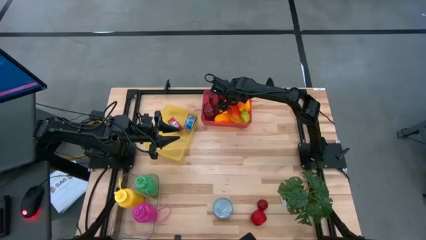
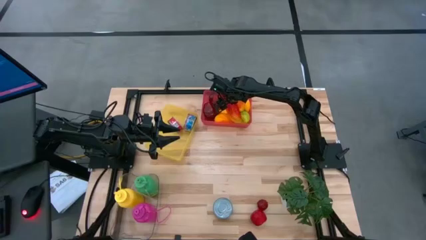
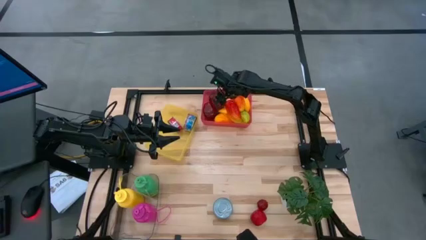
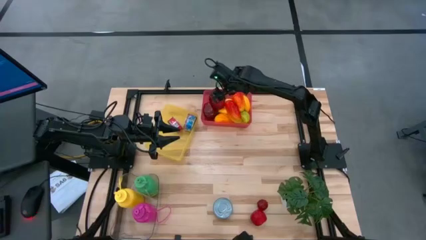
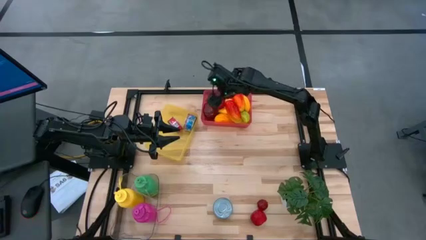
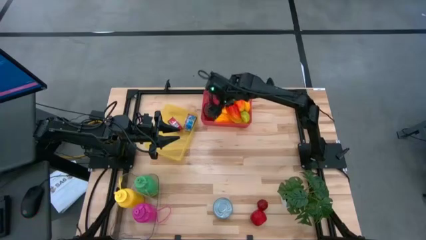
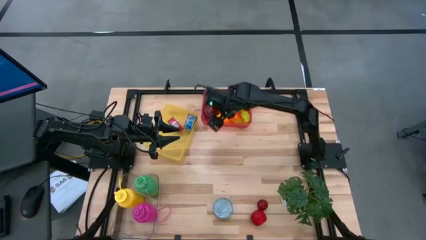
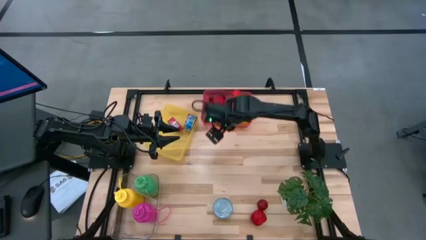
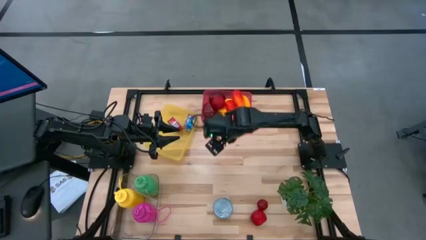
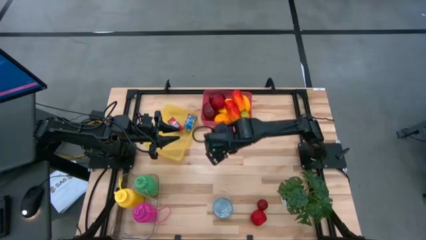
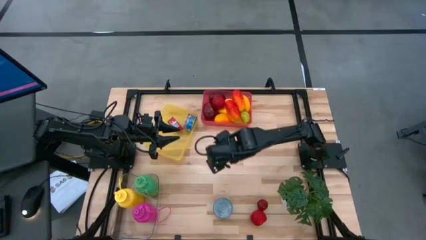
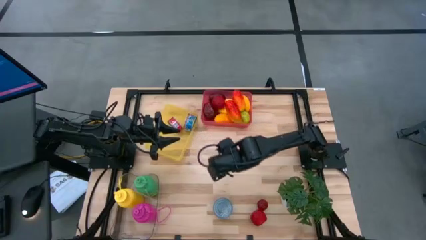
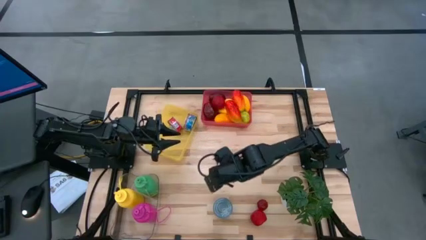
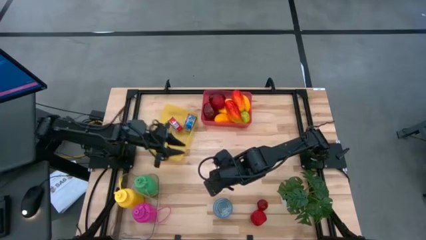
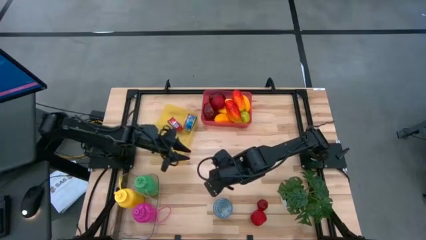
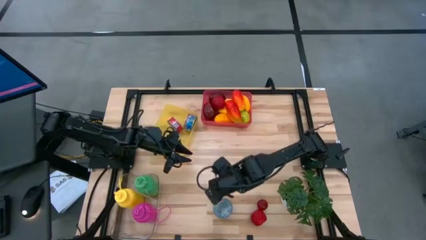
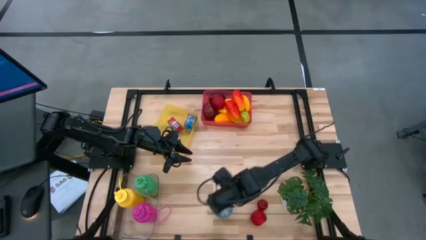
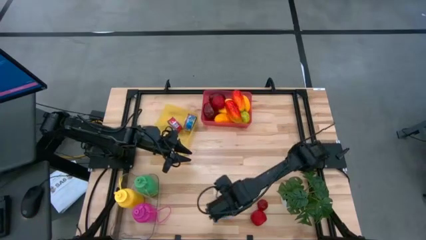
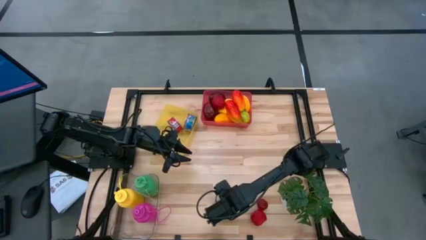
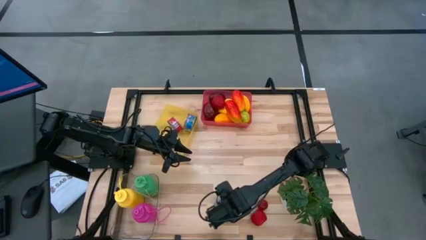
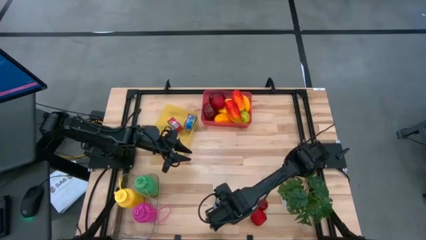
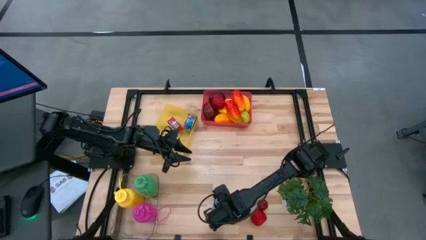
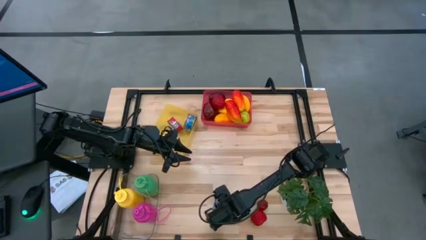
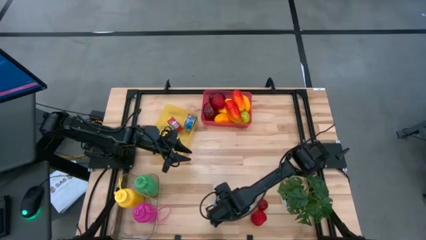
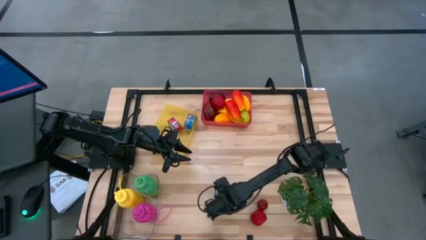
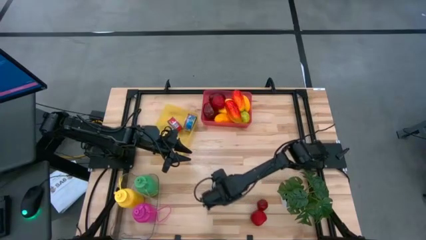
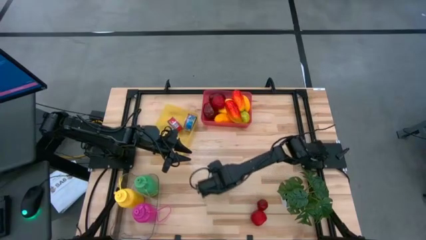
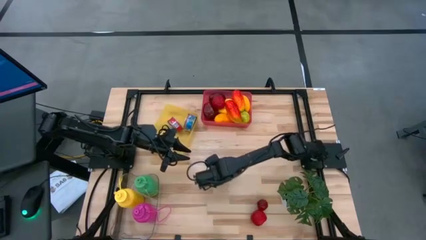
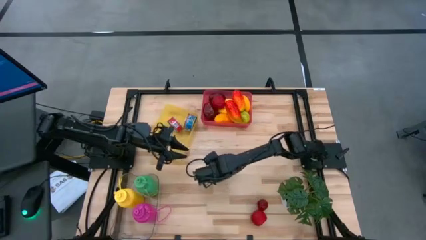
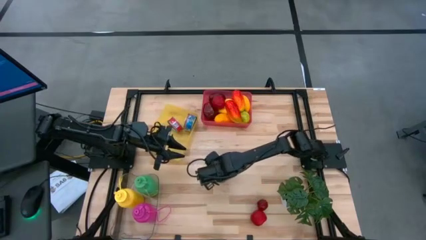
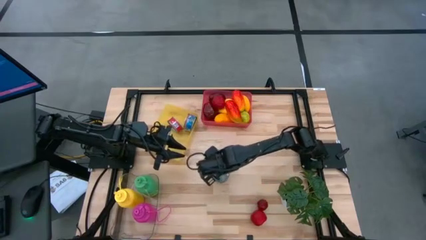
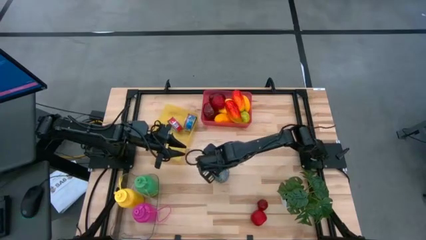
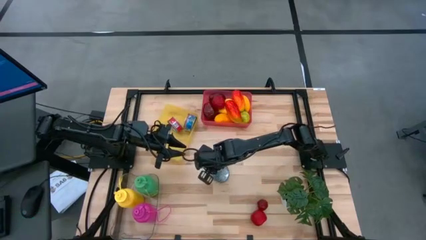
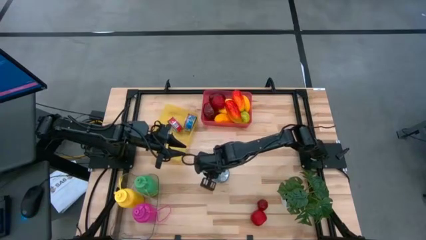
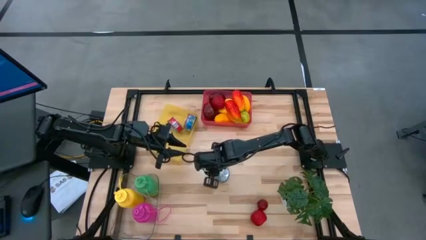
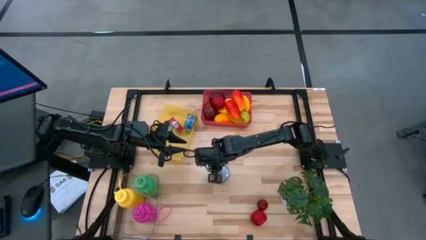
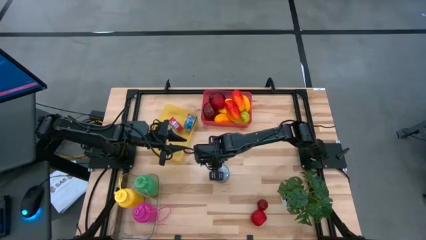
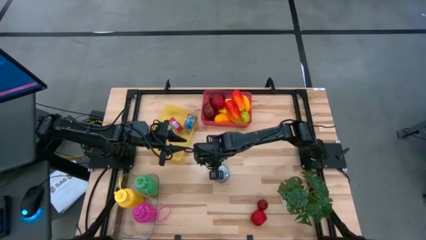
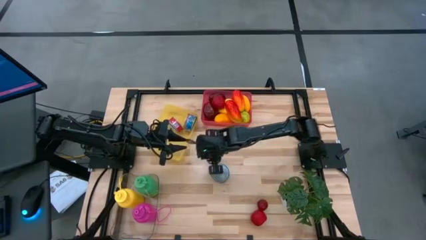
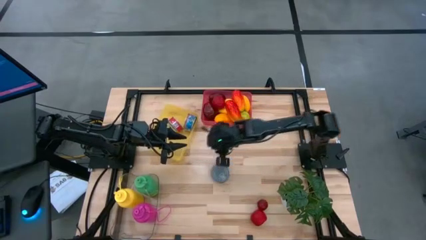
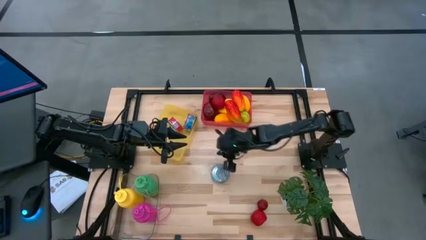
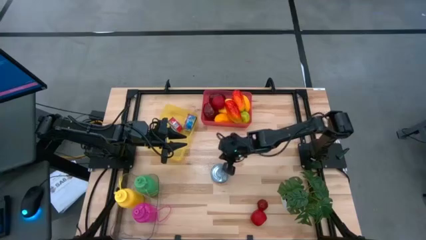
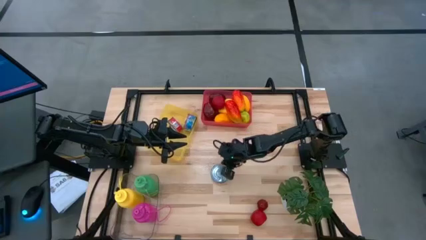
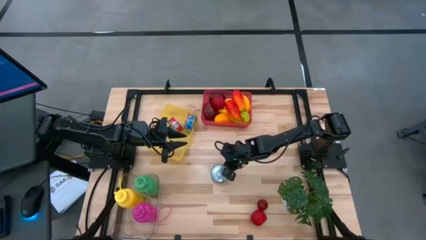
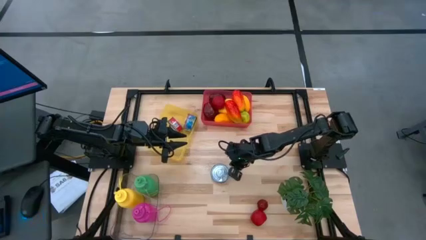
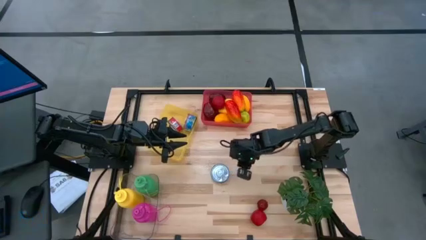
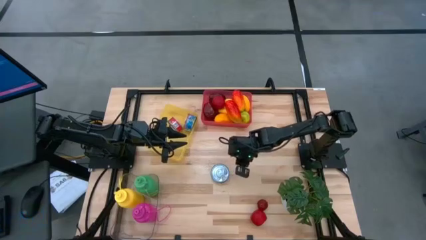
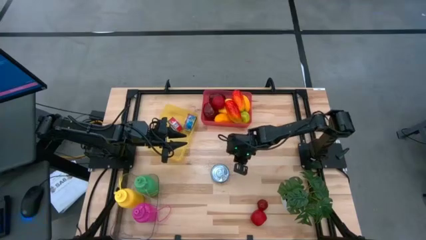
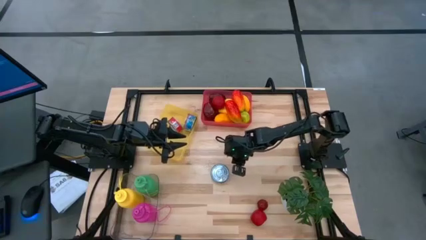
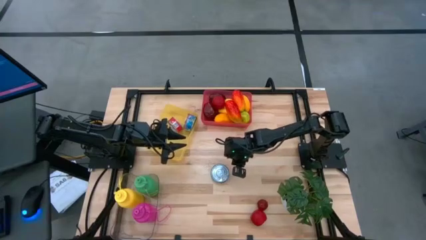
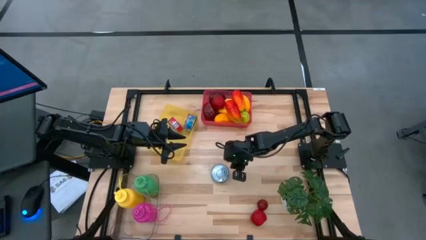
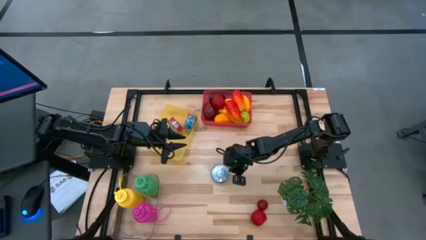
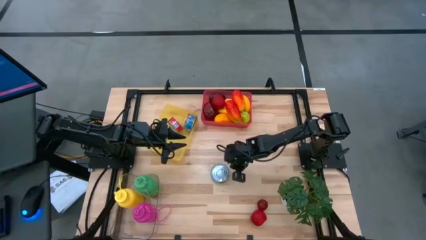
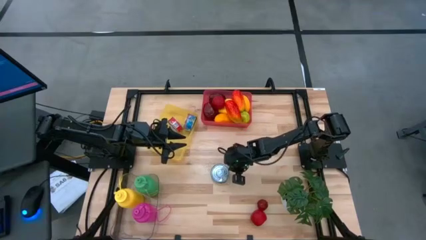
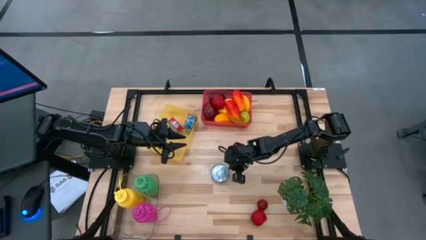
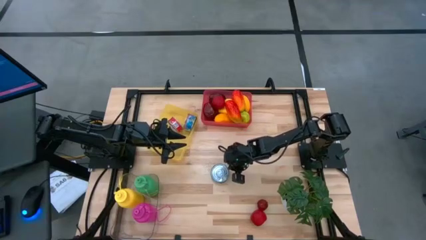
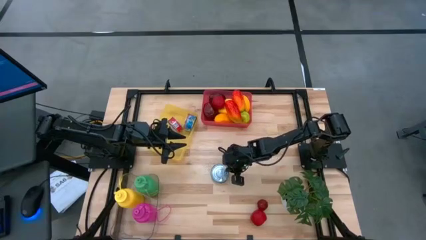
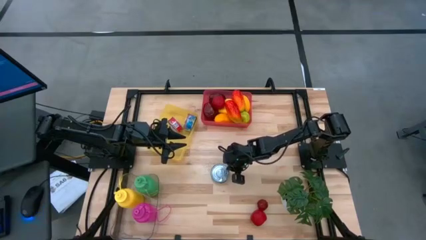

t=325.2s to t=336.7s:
Task: Pick & Place Food Item
Put the blue tuna can into the yellow bin
